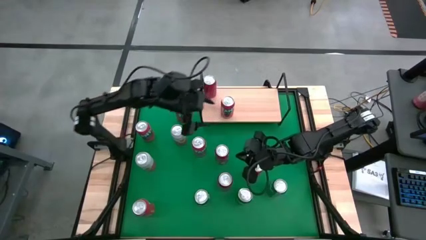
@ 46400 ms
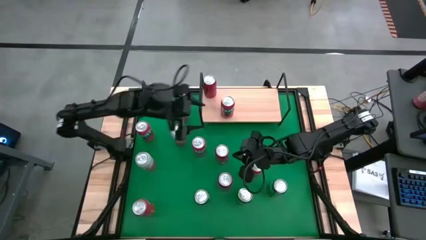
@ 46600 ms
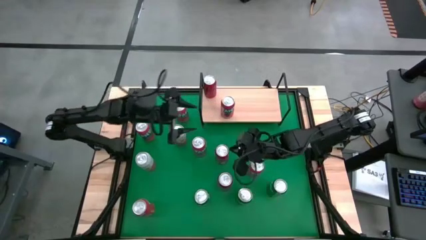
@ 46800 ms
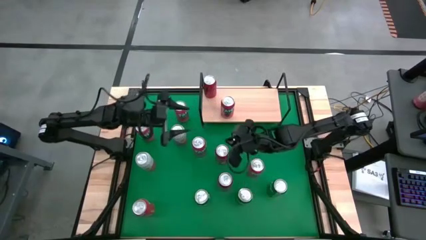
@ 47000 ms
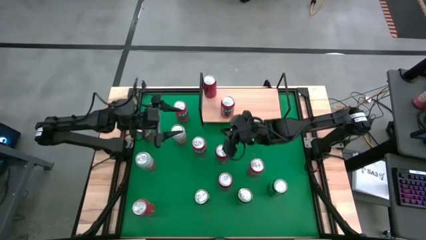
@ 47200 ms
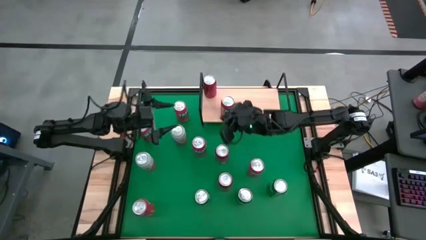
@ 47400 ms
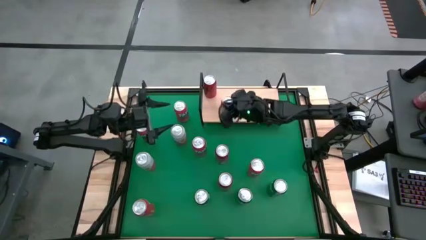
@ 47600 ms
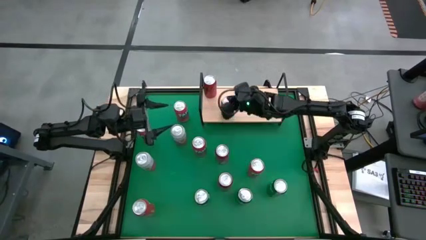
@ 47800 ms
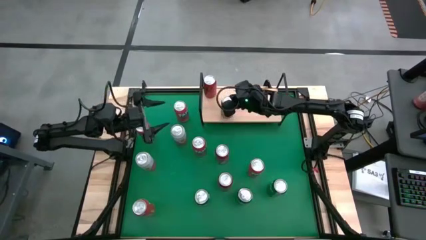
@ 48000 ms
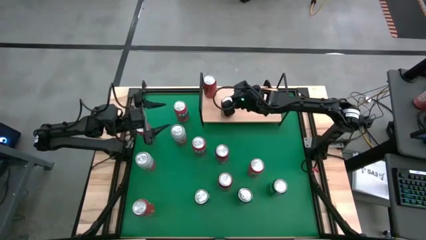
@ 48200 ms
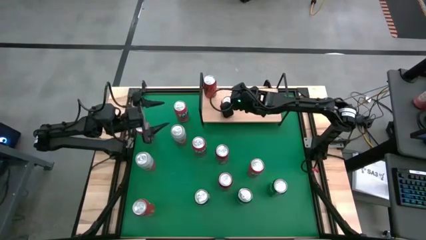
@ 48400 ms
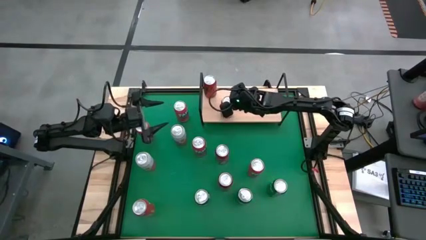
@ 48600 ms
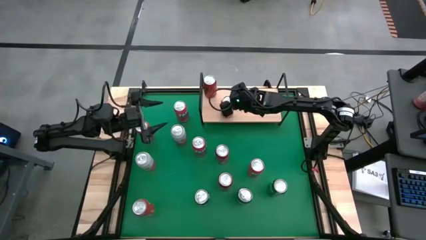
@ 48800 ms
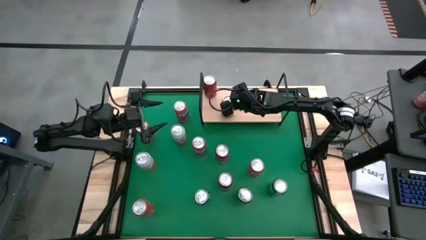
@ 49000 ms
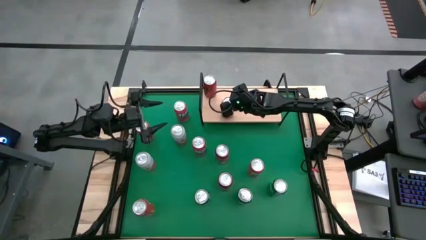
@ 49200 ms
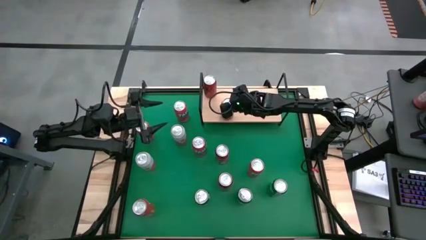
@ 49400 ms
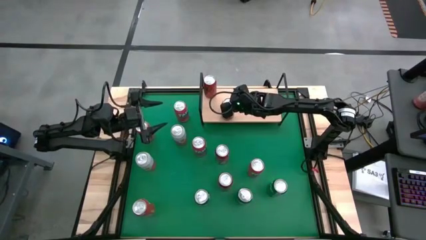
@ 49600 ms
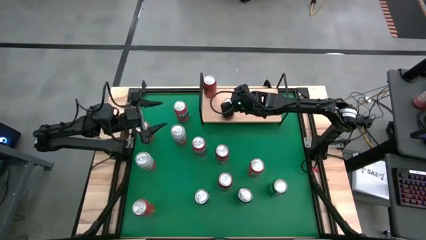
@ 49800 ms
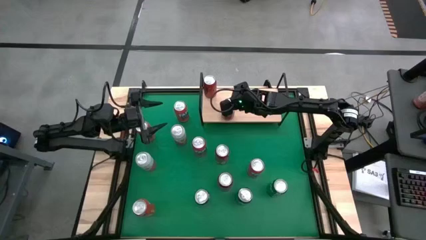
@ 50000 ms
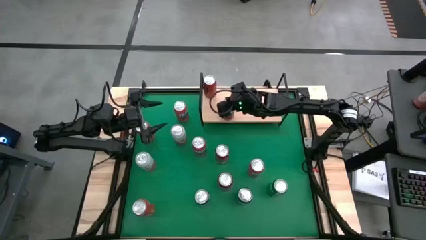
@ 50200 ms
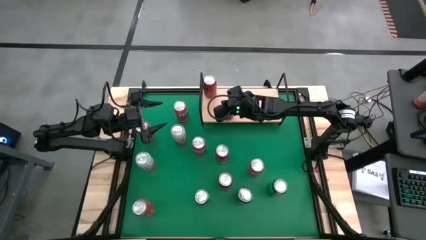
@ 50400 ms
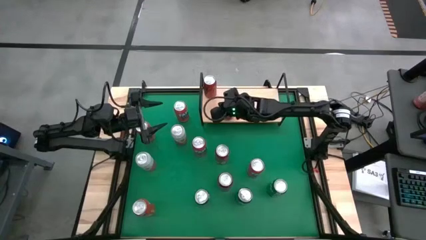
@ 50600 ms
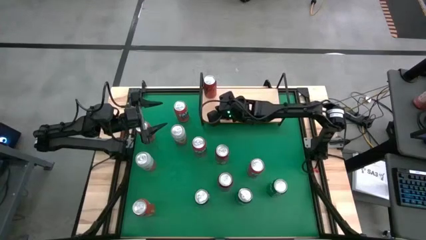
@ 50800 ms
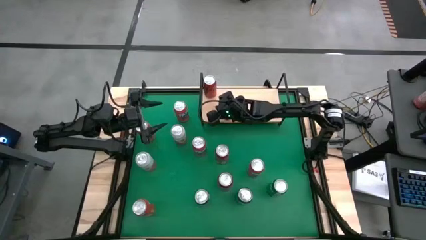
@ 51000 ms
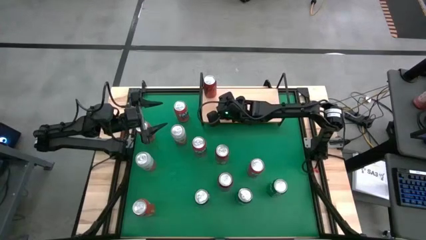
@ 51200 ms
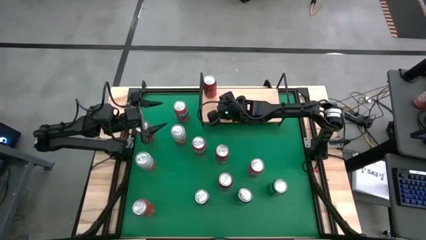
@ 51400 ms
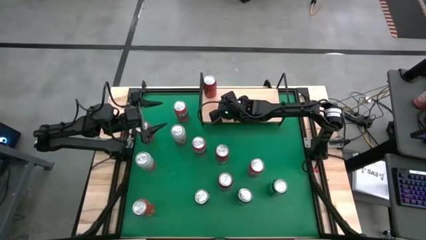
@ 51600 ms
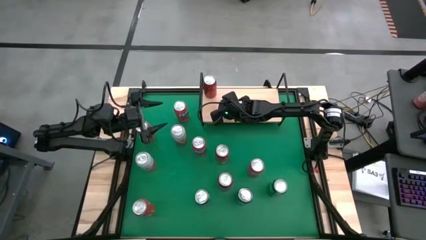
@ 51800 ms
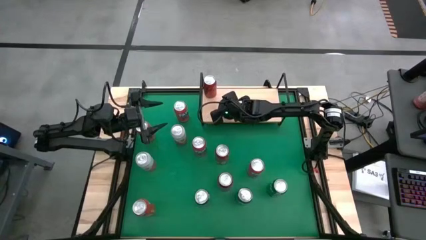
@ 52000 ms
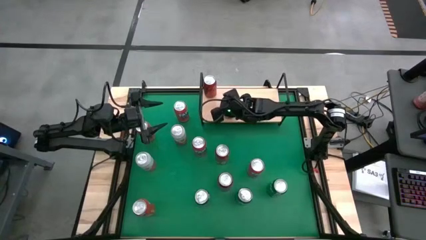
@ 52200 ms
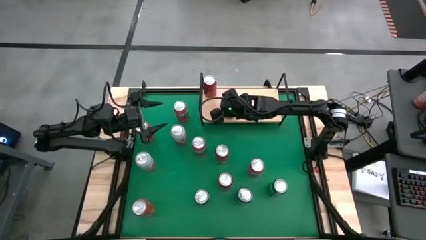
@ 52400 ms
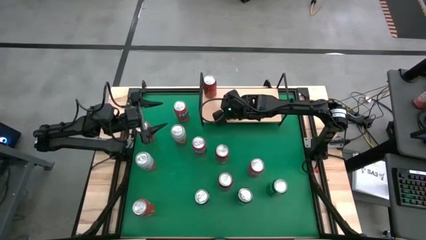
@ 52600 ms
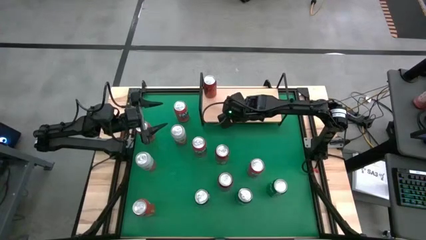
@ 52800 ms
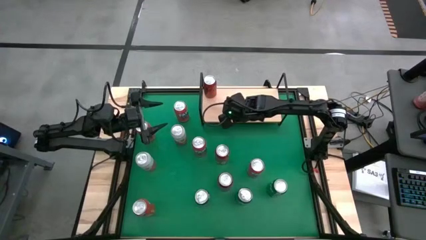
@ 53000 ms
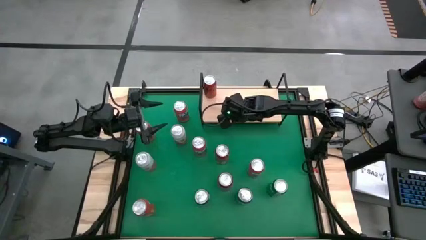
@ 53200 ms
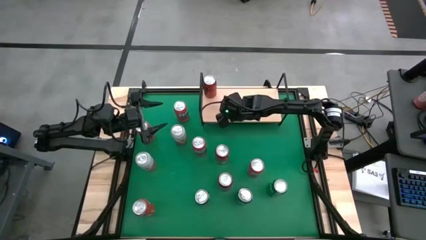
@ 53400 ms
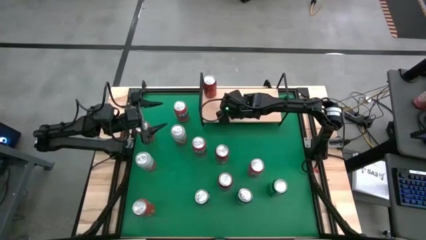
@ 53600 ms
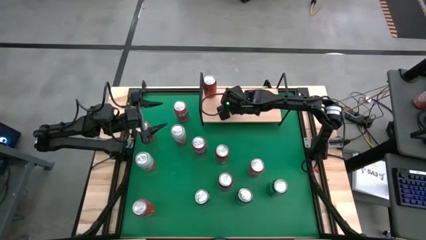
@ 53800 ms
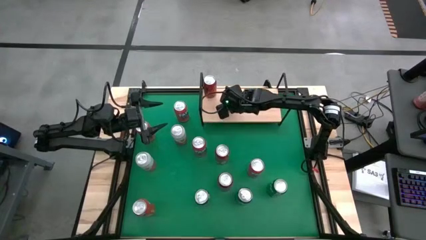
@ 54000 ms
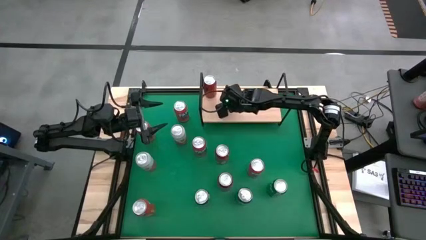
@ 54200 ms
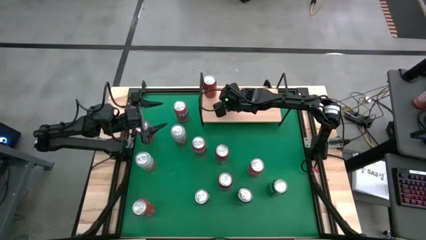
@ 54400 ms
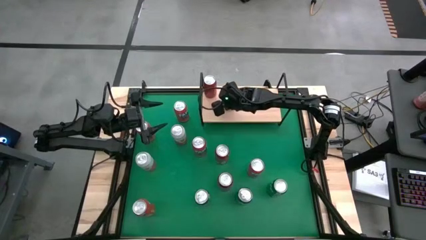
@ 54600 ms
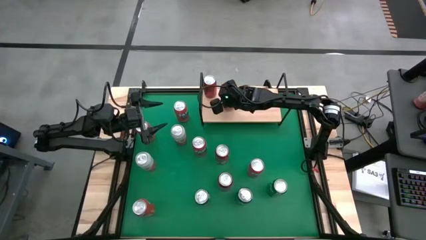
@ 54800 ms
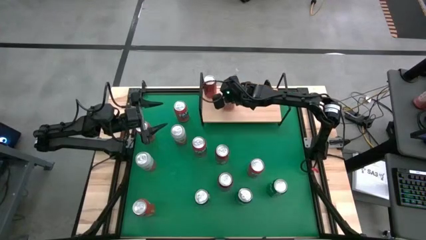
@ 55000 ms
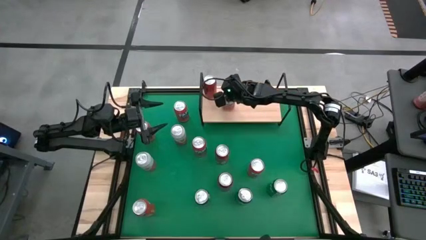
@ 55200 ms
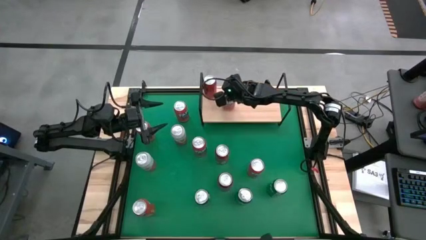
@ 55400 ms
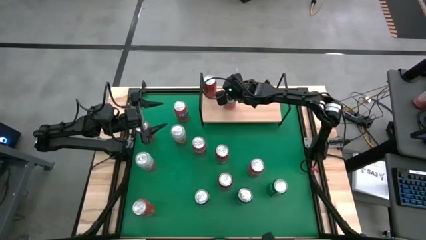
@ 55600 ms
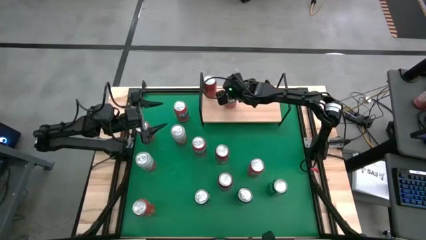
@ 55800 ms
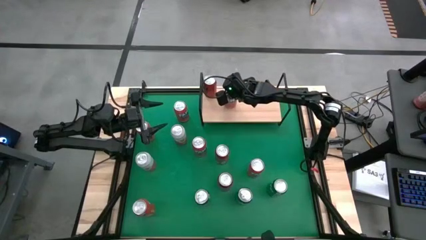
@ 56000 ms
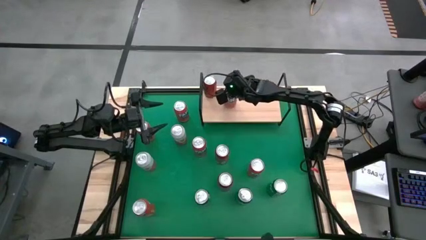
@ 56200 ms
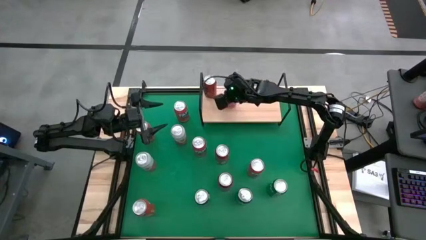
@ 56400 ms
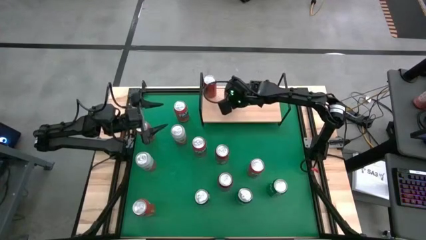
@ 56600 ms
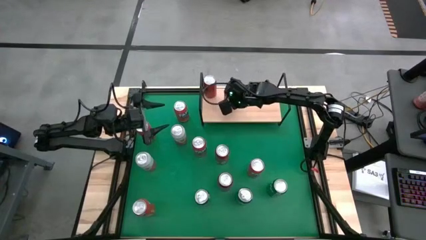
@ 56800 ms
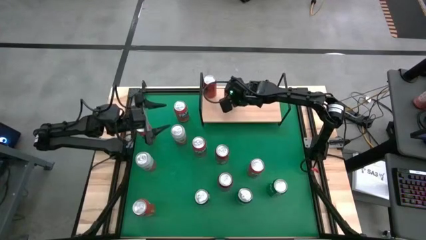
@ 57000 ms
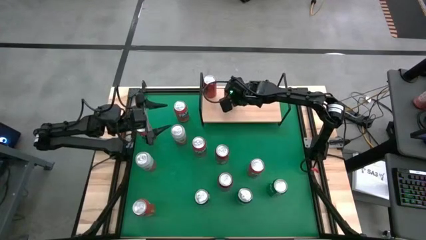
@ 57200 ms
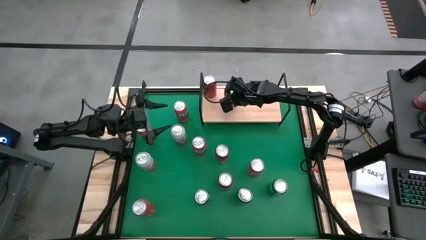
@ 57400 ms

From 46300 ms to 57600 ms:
Task: Place canned beverage on shelf
Put the red soda can on the shelf
